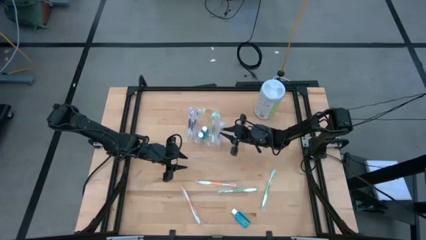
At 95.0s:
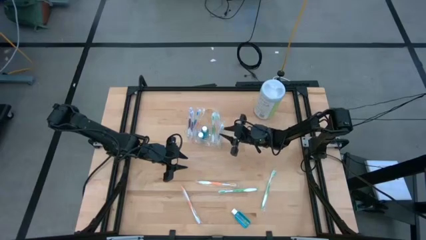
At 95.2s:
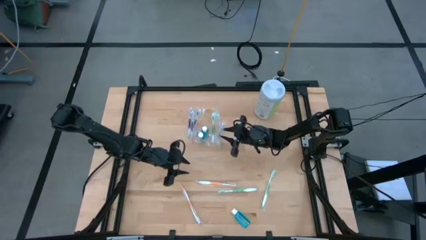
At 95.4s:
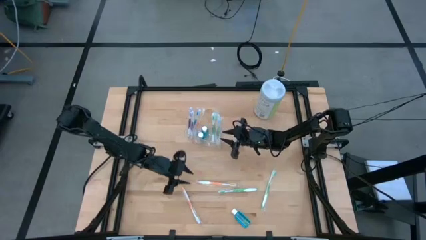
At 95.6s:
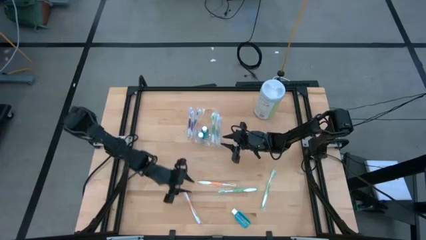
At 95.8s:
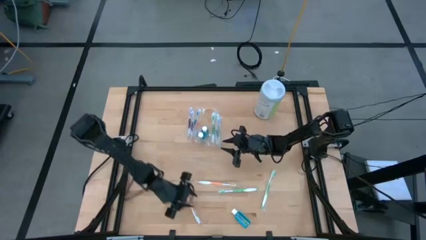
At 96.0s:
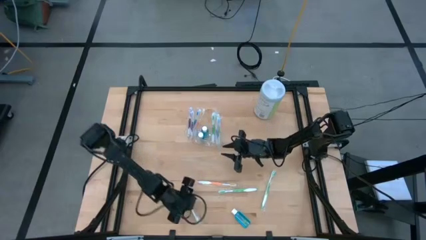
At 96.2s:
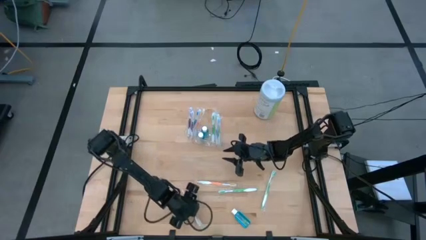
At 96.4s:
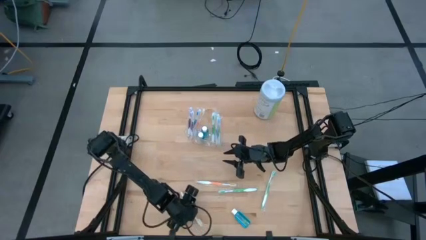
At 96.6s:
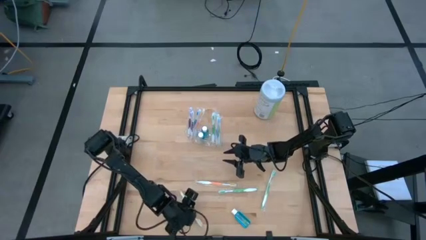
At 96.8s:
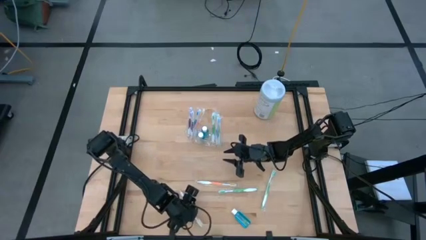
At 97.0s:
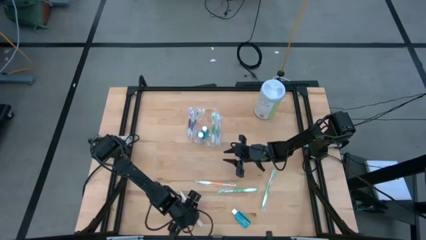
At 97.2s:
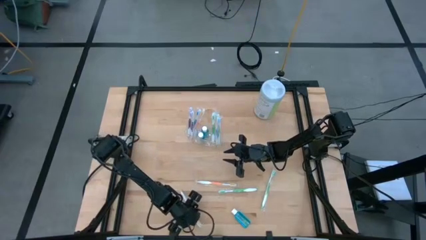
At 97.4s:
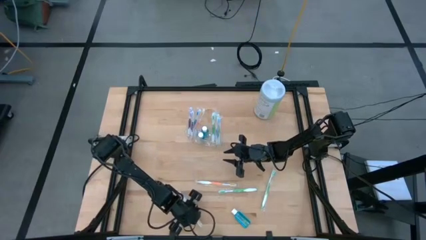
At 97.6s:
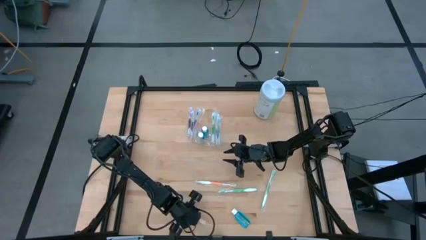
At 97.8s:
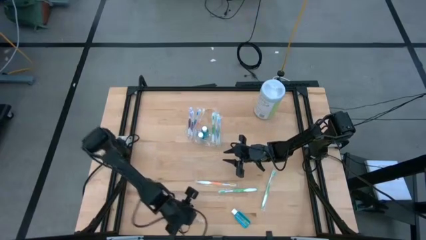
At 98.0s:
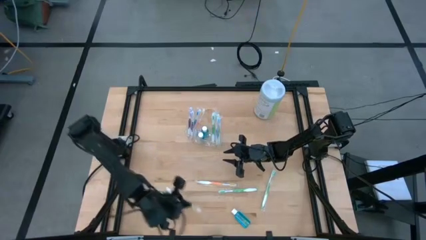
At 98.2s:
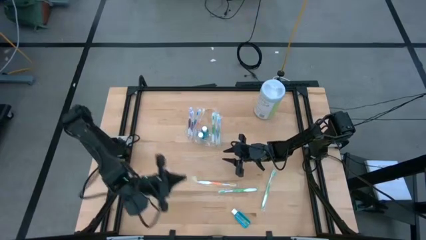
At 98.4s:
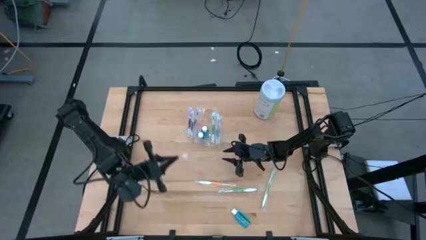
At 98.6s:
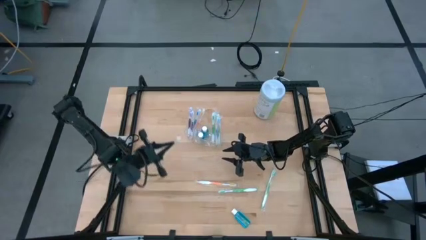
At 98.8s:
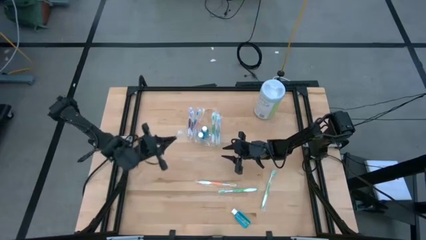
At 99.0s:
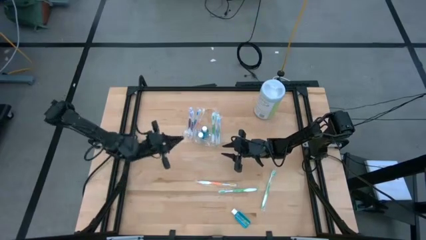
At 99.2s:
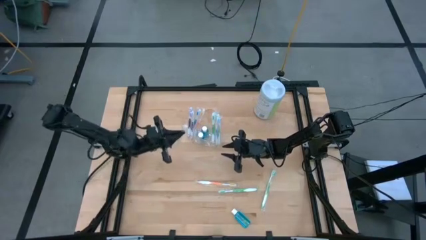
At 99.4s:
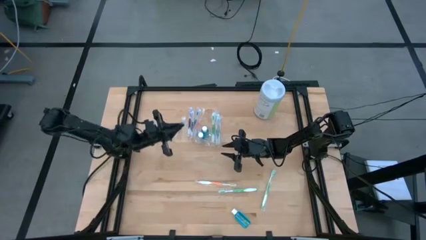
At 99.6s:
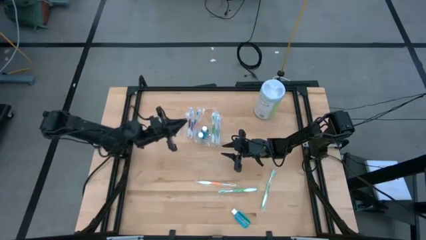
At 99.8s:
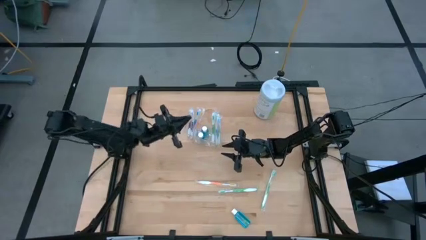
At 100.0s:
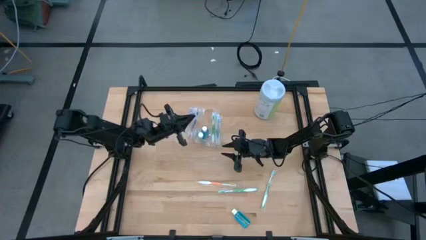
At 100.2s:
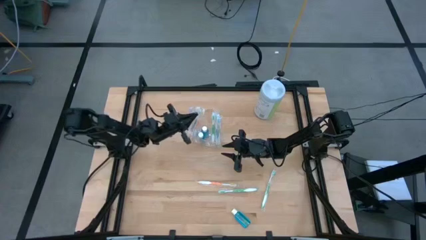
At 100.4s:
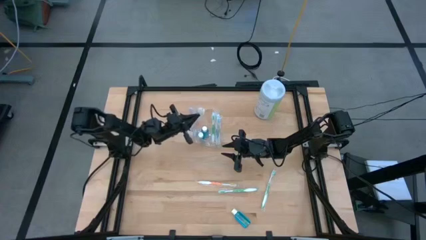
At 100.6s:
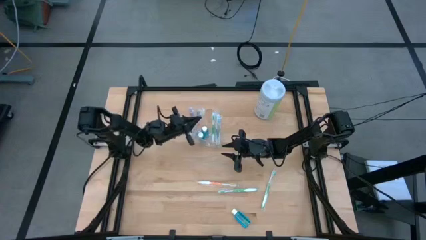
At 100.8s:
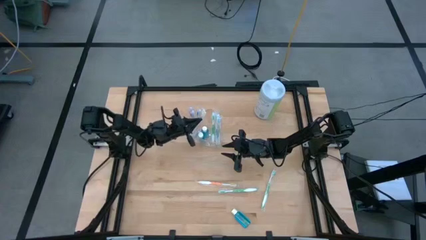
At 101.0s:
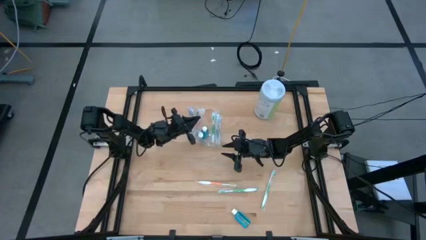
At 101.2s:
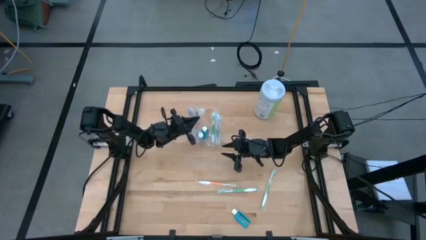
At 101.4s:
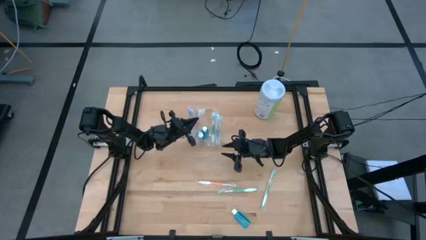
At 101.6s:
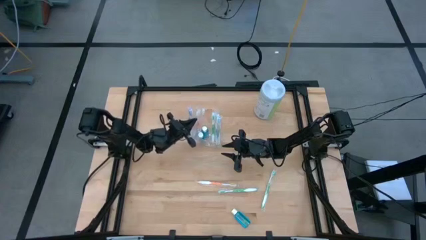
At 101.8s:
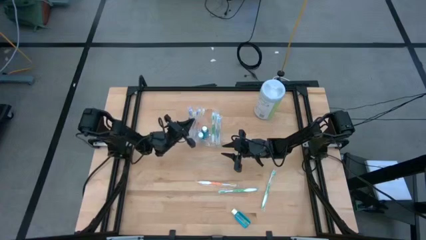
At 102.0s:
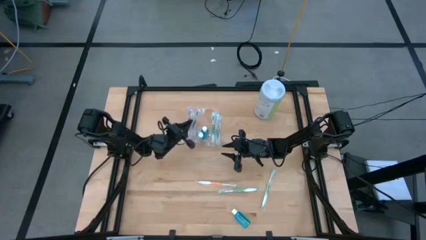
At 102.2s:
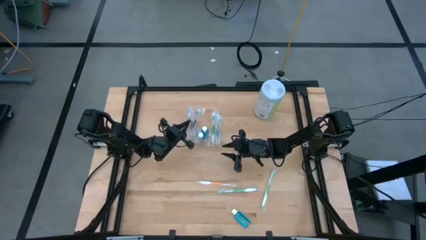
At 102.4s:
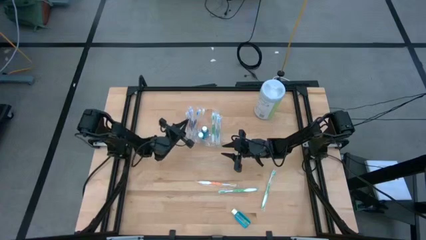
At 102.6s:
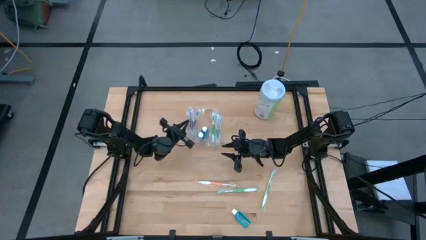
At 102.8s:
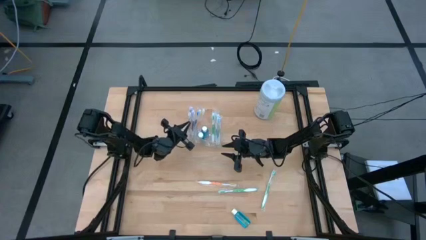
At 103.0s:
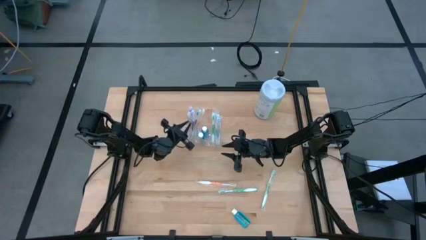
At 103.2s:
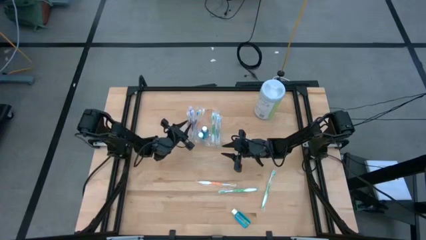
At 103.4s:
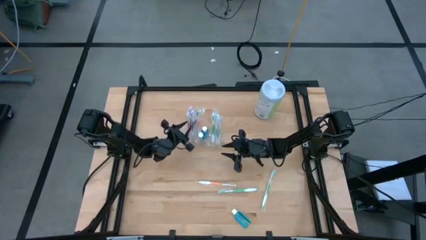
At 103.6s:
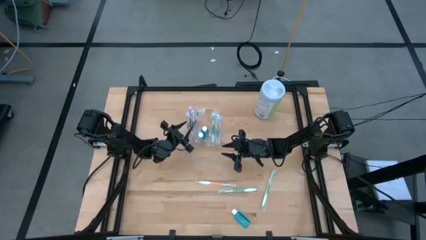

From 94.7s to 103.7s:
Task: Pick & Place toothbrushing station
Put the bottom orange toothbrush into the transparent organizer

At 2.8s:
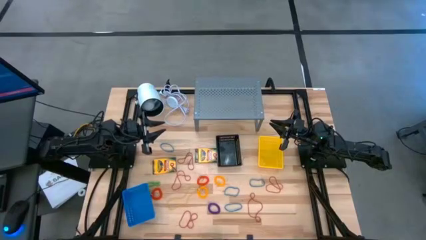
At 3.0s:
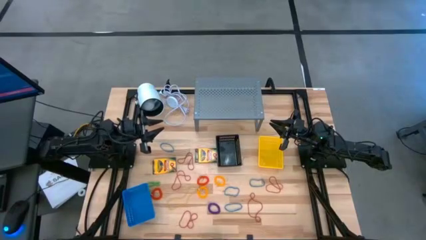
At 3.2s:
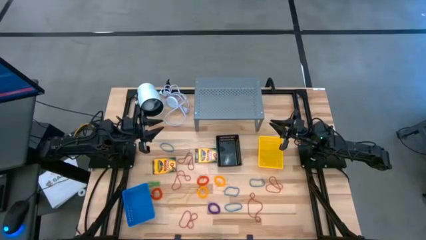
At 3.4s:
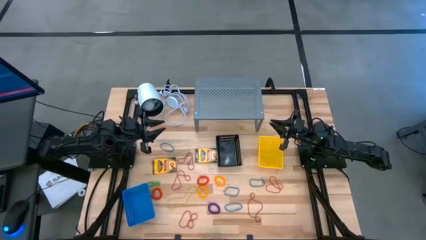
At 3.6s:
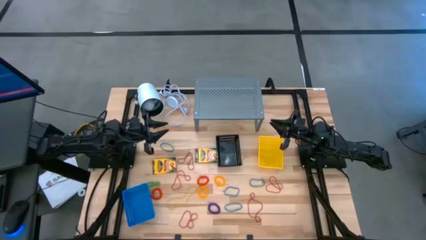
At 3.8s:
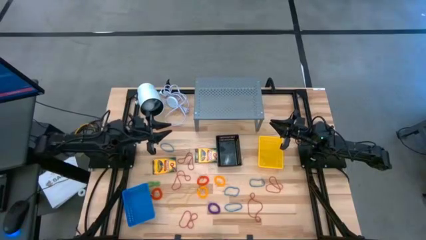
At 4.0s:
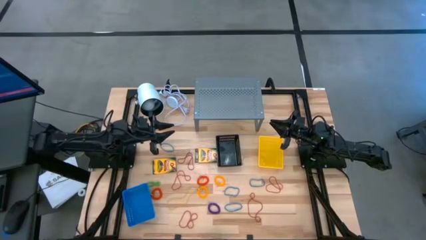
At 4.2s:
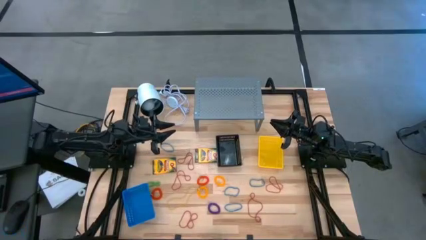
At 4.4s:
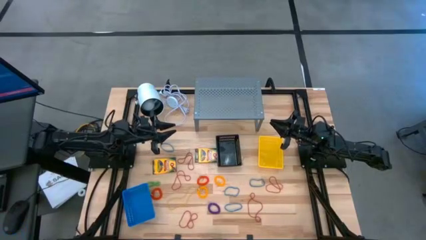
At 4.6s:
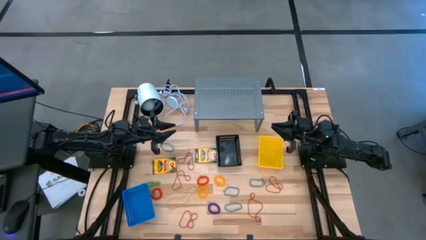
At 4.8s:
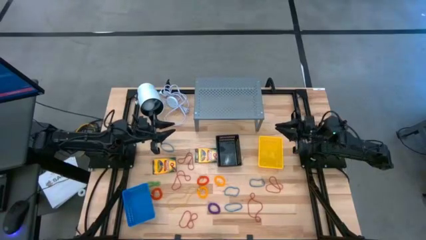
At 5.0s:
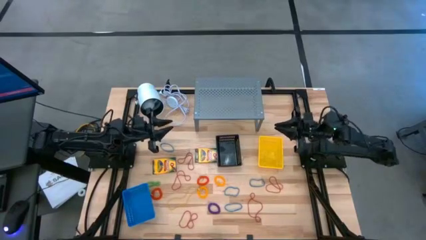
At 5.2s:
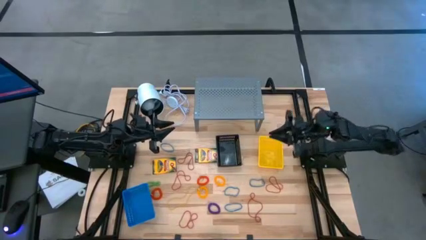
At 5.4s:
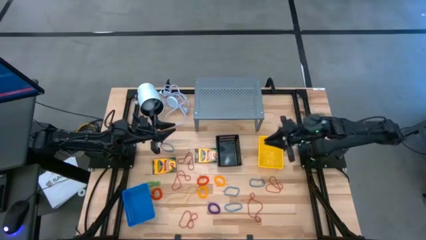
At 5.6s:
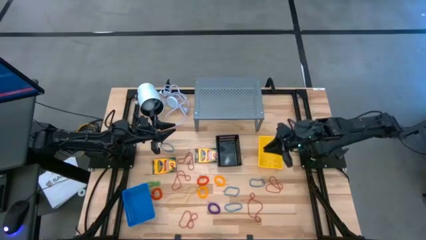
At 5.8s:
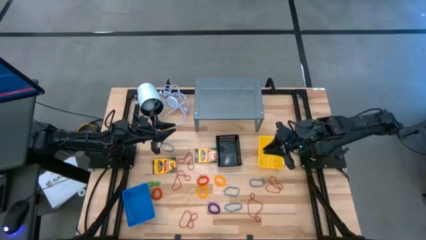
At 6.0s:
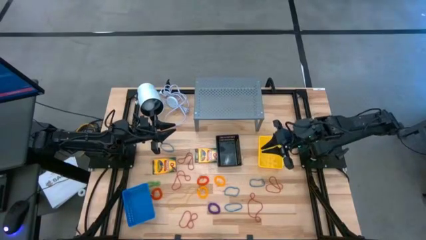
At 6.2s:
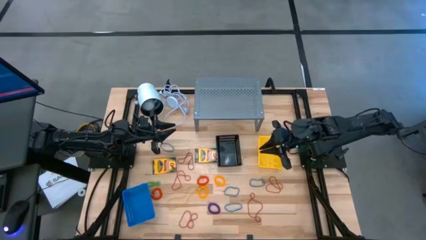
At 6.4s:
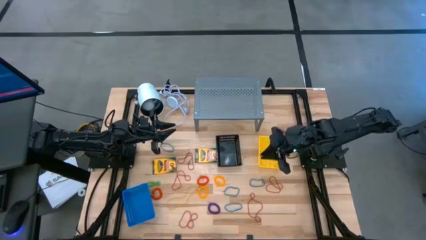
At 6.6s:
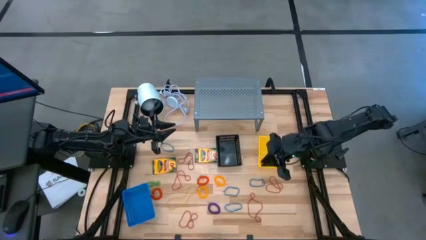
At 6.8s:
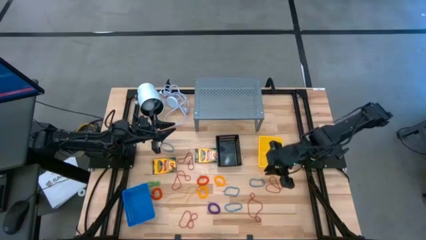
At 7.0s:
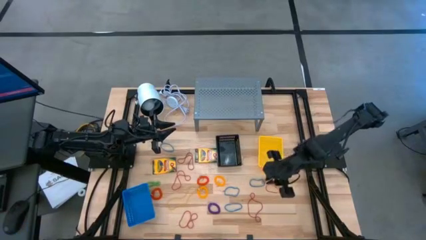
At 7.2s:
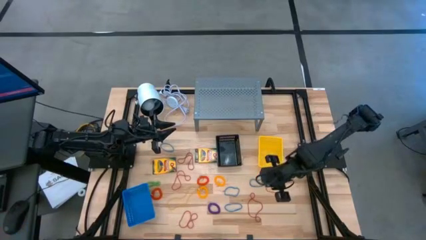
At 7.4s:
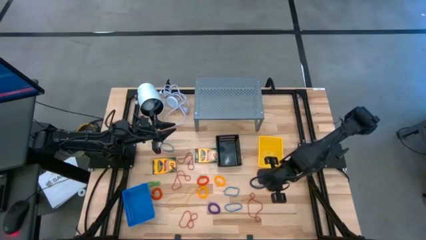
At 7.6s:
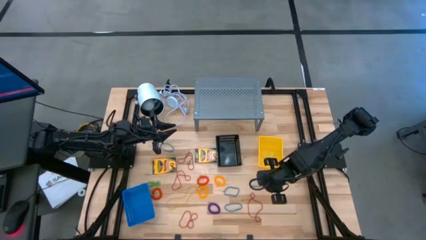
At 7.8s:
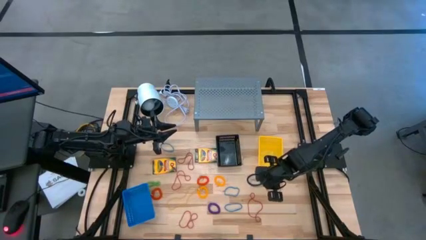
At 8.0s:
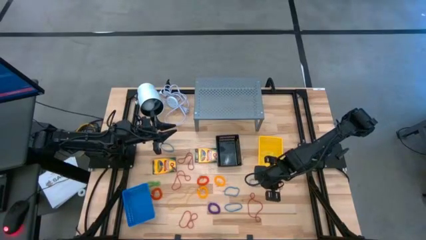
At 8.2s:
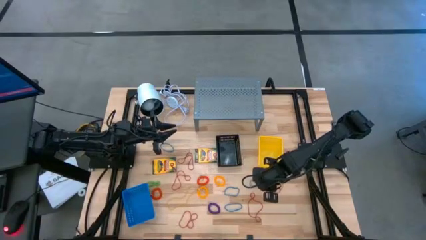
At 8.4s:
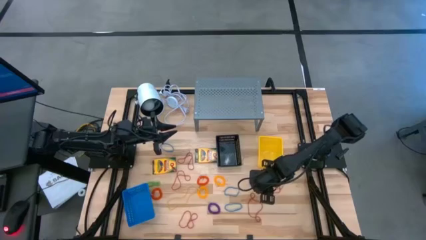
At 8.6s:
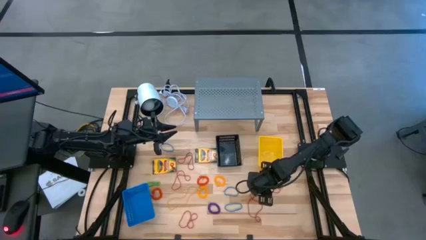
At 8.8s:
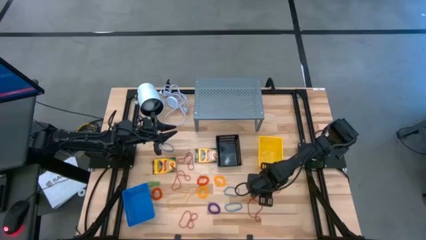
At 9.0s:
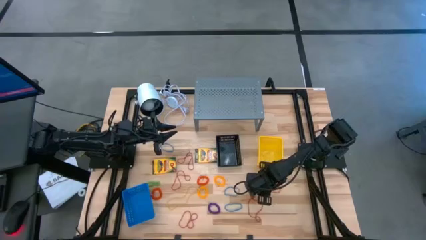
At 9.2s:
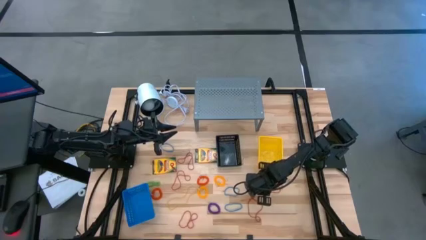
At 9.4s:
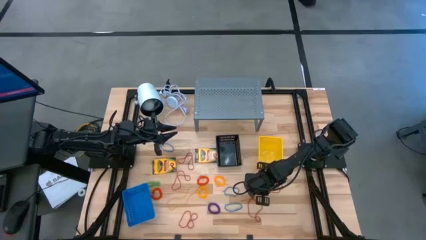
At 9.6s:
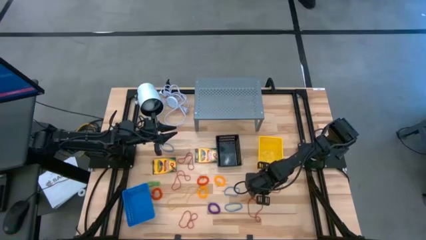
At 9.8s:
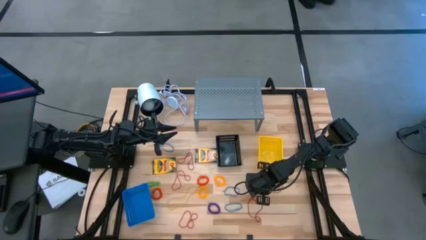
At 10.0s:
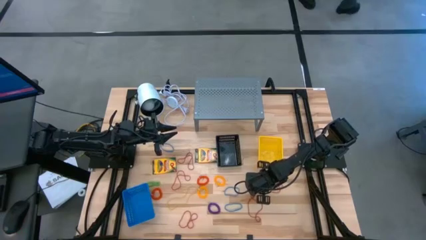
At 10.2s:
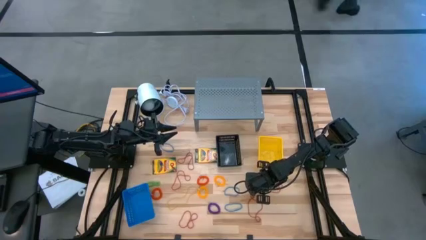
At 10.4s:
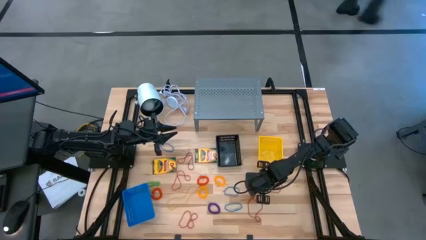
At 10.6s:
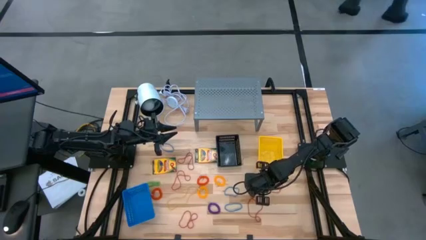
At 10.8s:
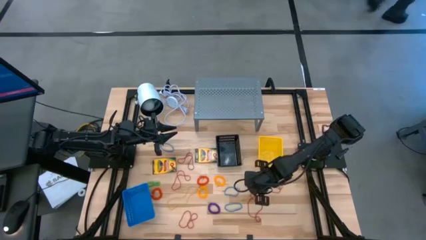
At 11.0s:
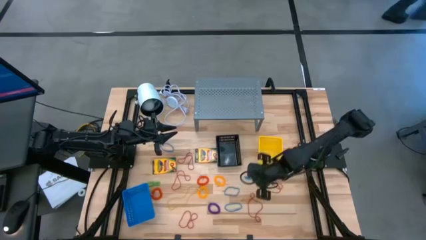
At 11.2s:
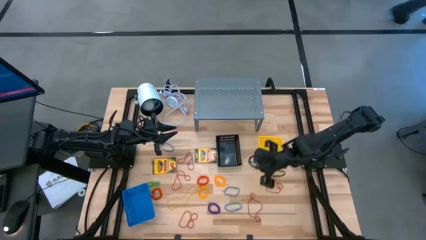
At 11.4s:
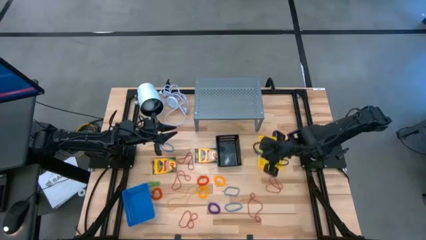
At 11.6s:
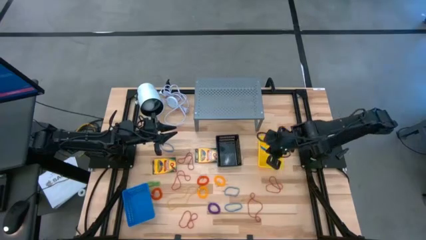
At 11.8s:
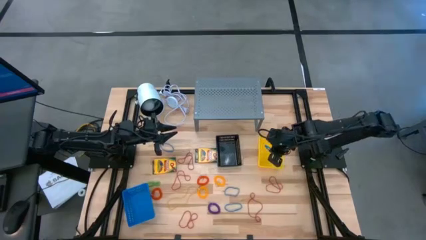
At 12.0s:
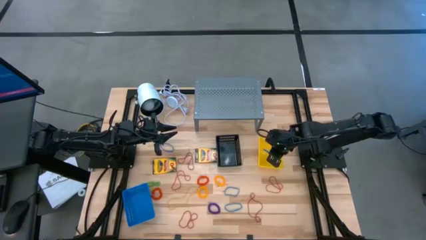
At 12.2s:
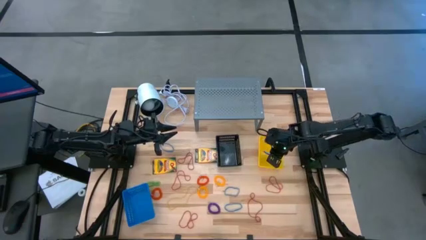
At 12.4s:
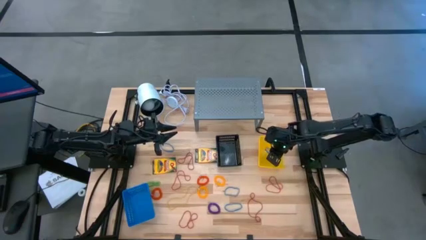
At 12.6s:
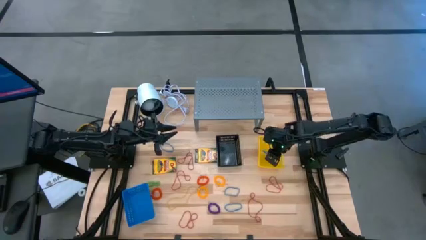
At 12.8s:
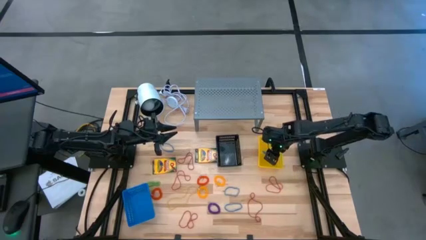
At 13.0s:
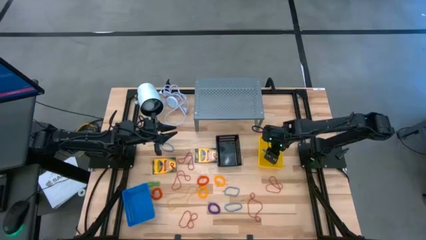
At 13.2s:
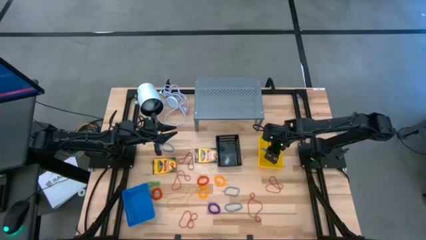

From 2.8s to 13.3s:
Task: Pick & Place Office Desk Supplies
Put the blue rubber band into the yellow basket
